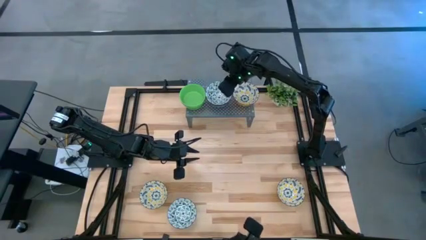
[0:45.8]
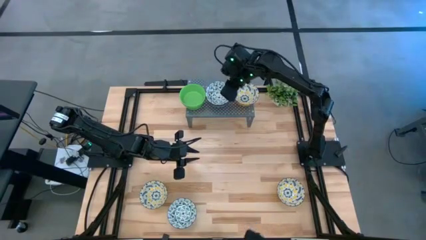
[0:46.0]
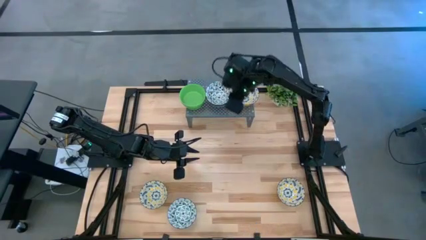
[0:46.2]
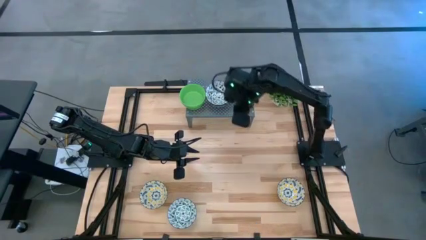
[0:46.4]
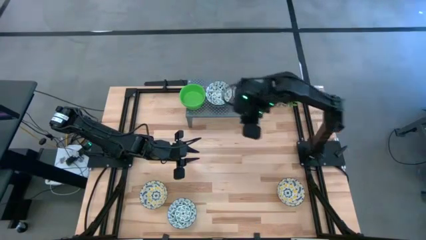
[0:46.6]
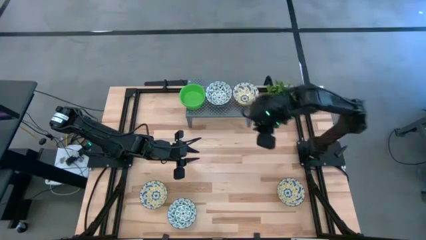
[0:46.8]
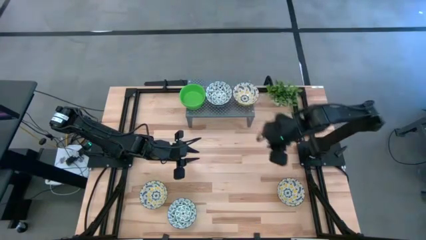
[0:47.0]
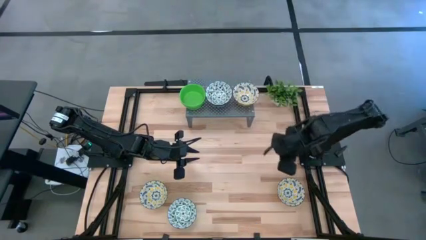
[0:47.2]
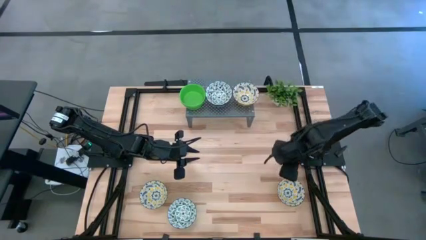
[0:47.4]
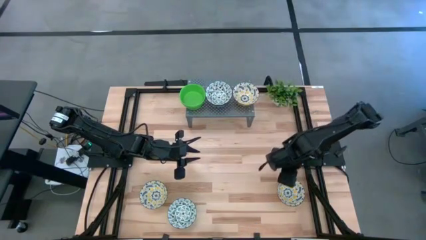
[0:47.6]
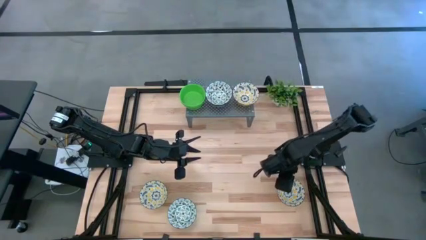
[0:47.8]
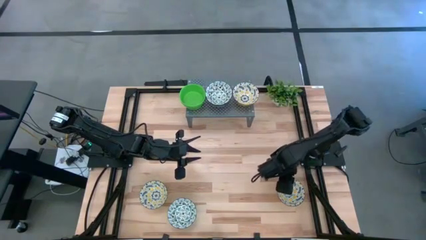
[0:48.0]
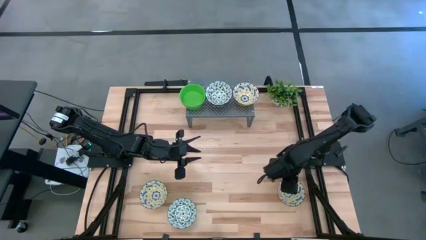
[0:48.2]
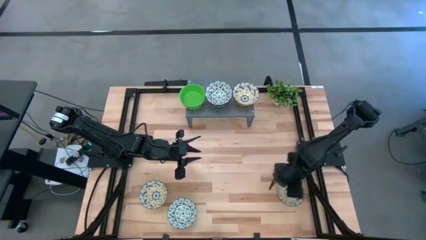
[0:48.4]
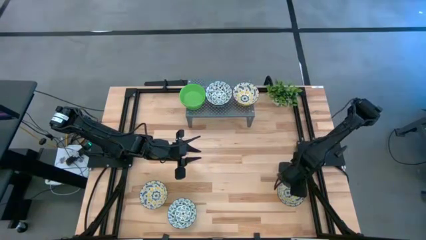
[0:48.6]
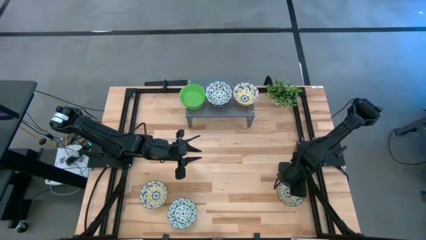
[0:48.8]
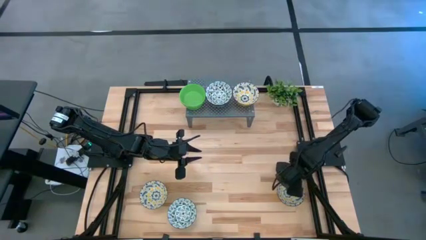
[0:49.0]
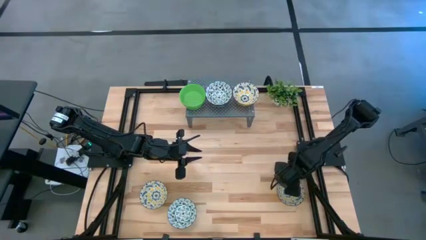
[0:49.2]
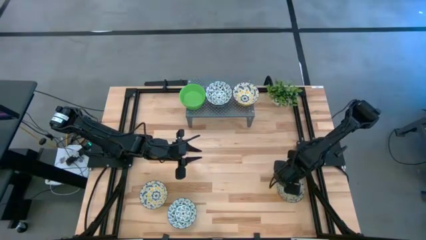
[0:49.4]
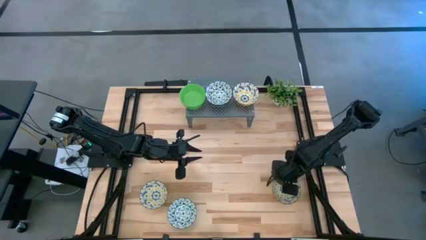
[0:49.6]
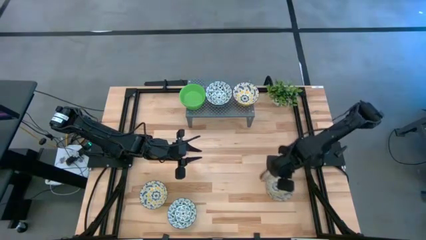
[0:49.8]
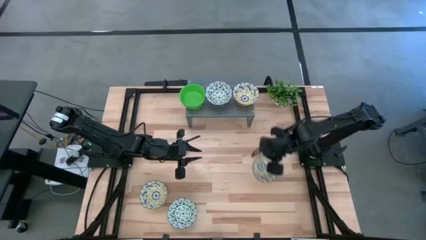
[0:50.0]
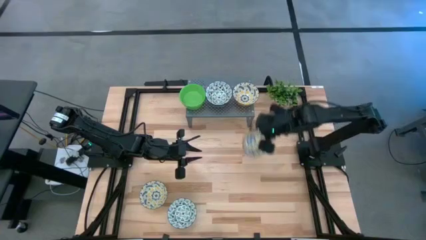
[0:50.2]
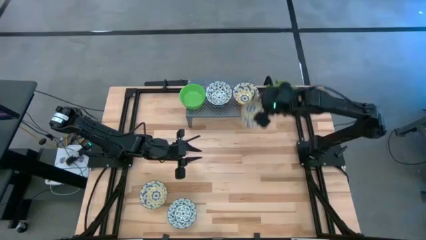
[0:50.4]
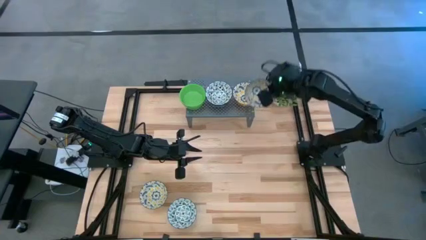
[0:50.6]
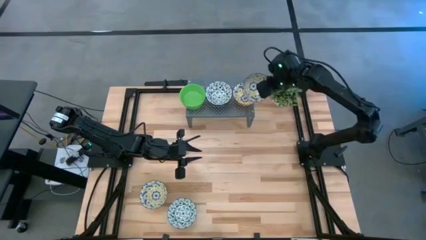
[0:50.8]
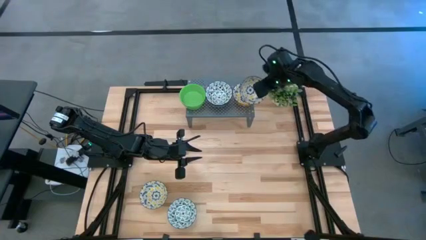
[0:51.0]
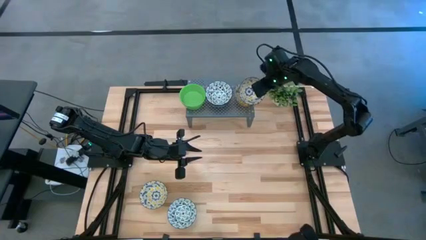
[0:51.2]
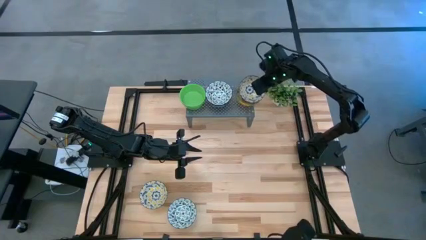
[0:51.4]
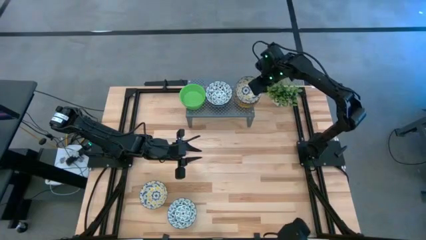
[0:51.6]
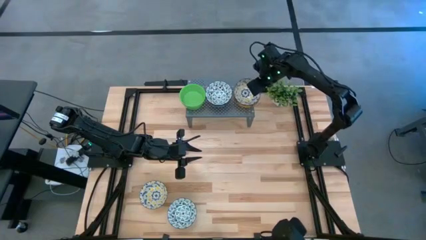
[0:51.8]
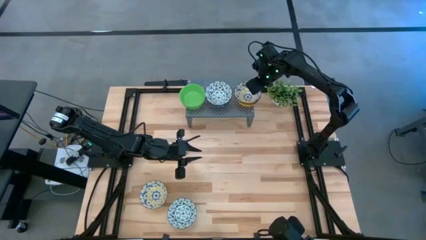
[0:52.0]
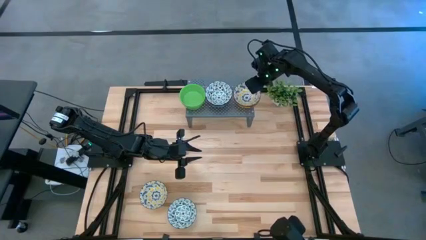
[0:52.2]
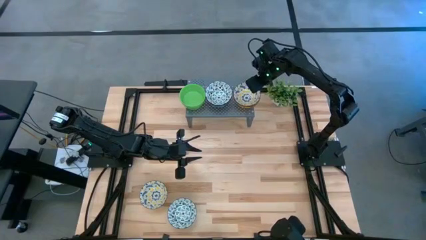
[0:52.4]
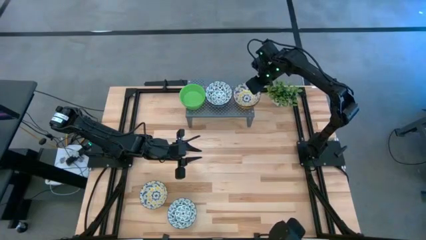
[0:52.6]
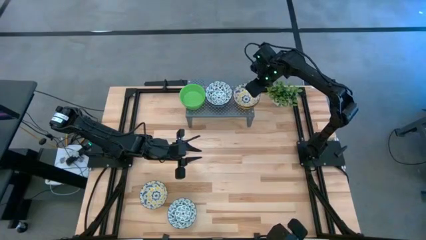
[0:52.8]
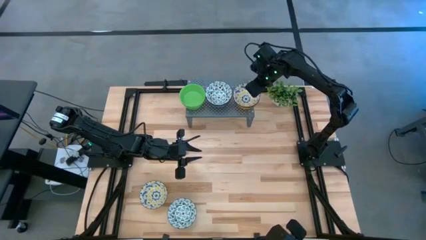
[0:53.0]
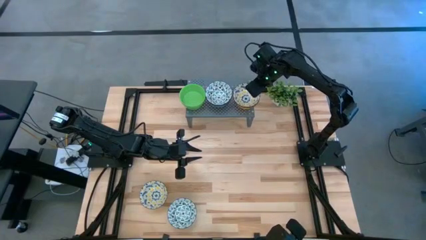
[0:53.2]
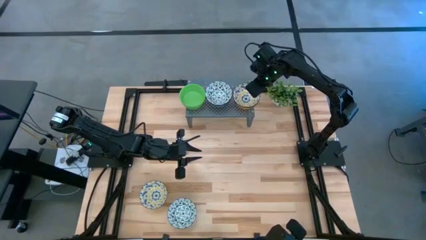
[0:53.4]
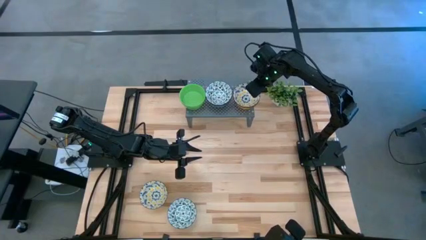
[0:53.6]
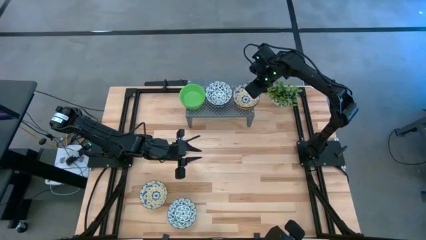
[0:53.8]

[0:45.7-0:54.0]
Task: Pick & Place Mini bowls
Stack the right yellow patterned bowl on top of the yellow patterned bowl on the shelf

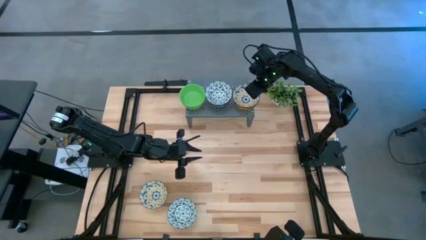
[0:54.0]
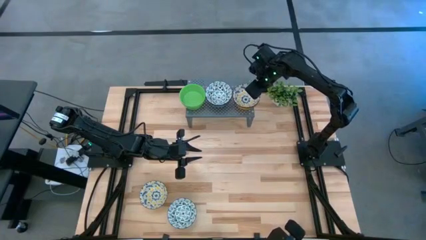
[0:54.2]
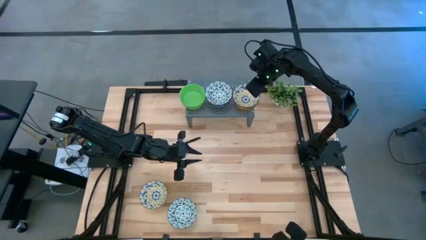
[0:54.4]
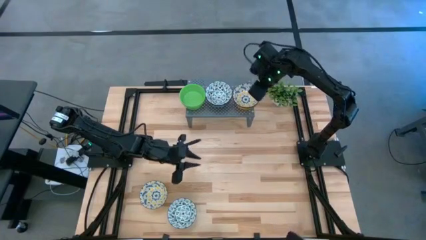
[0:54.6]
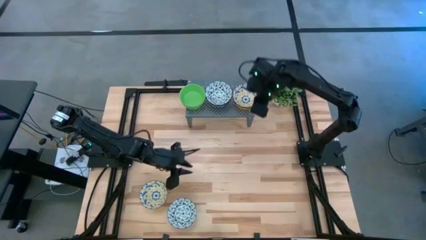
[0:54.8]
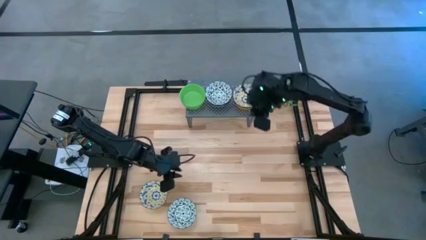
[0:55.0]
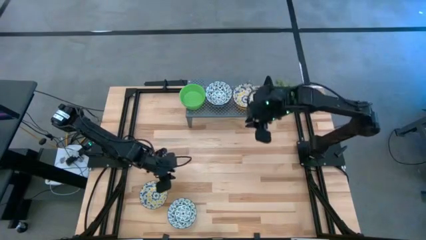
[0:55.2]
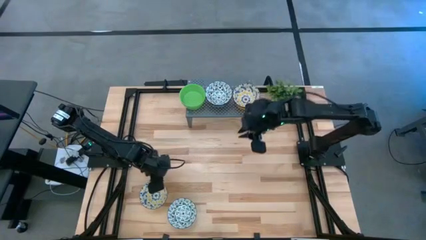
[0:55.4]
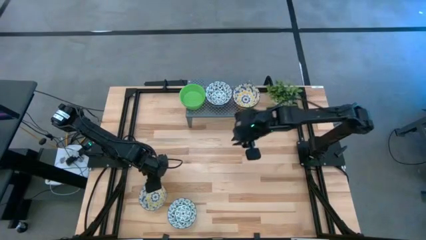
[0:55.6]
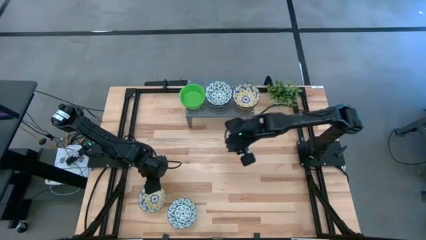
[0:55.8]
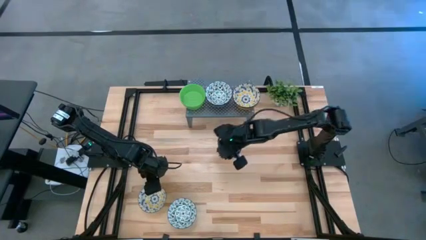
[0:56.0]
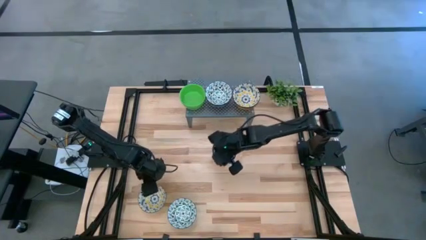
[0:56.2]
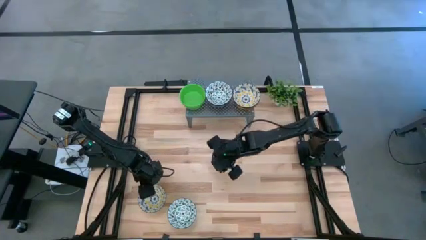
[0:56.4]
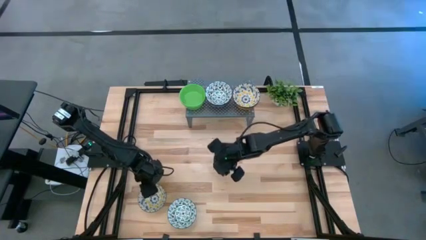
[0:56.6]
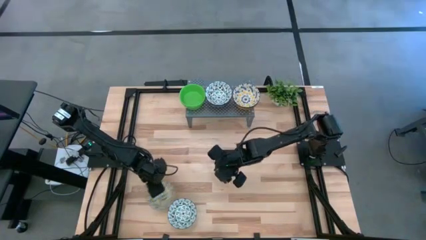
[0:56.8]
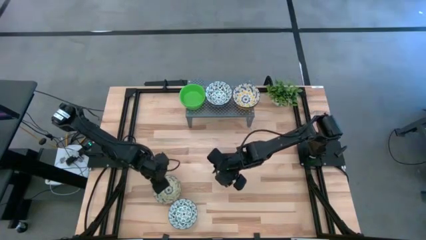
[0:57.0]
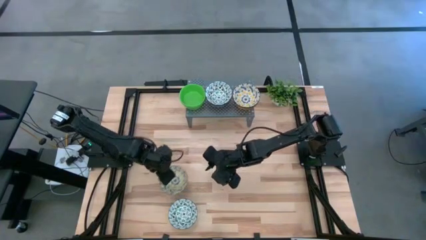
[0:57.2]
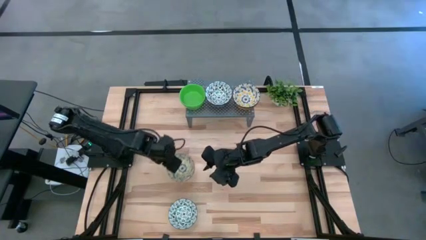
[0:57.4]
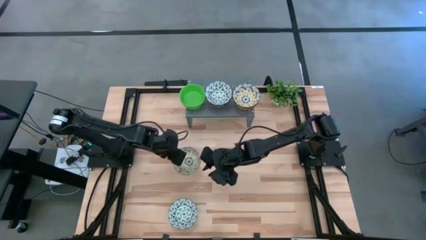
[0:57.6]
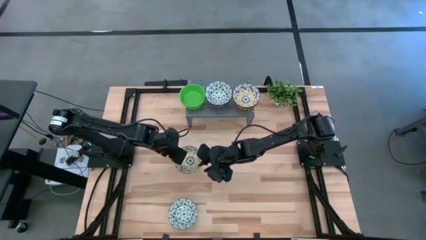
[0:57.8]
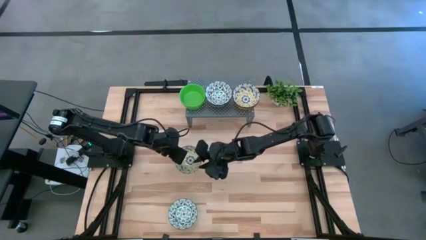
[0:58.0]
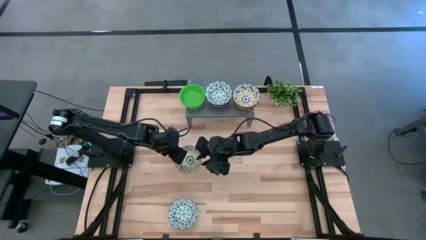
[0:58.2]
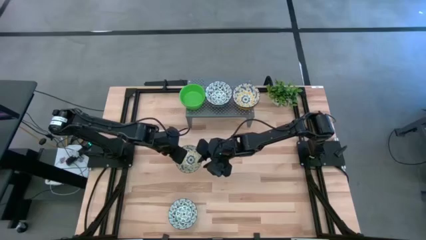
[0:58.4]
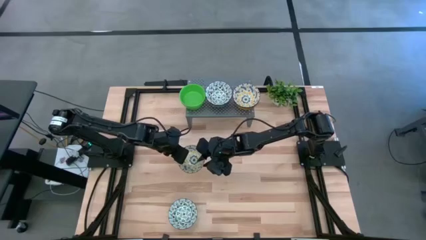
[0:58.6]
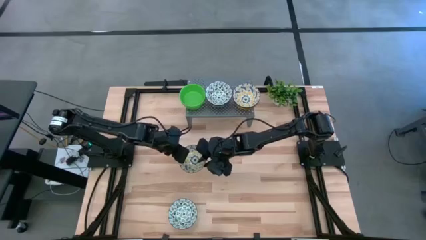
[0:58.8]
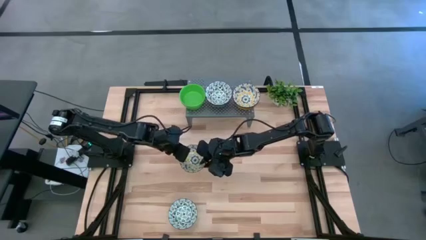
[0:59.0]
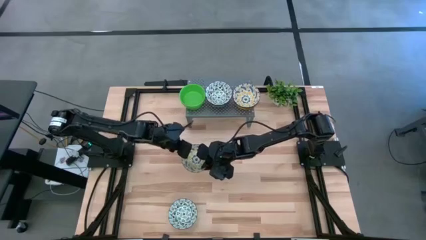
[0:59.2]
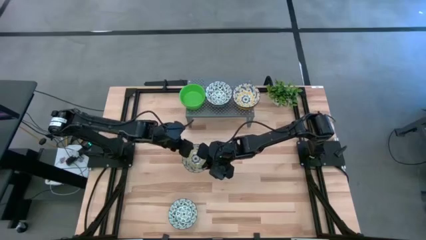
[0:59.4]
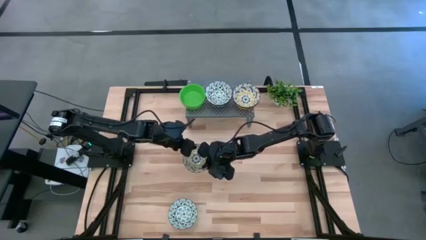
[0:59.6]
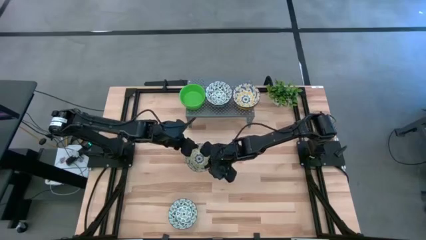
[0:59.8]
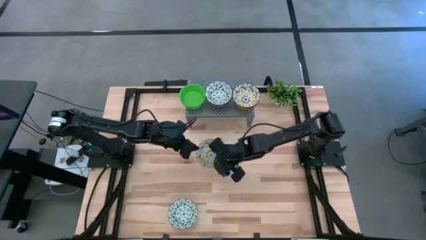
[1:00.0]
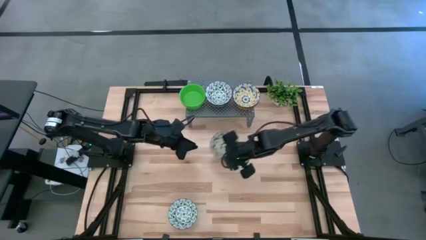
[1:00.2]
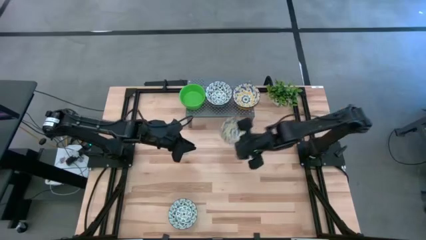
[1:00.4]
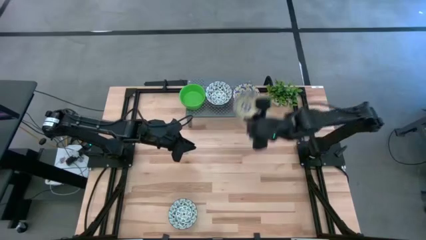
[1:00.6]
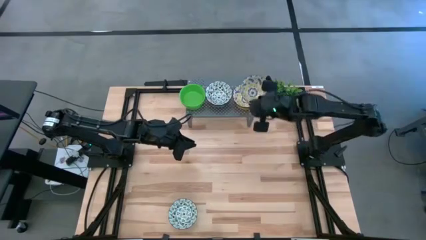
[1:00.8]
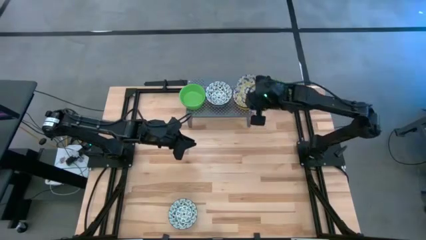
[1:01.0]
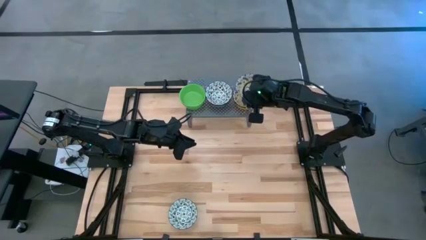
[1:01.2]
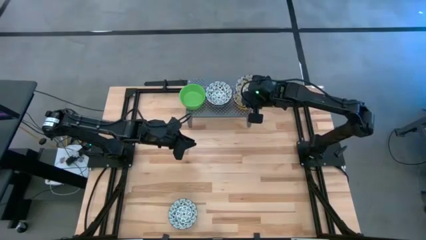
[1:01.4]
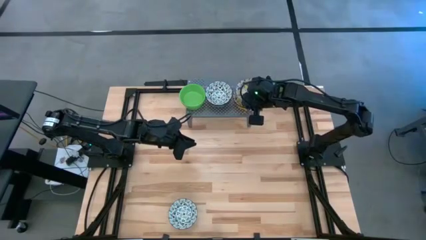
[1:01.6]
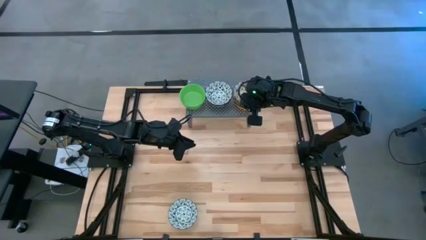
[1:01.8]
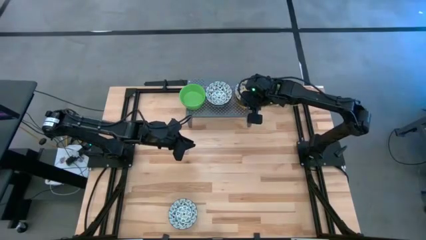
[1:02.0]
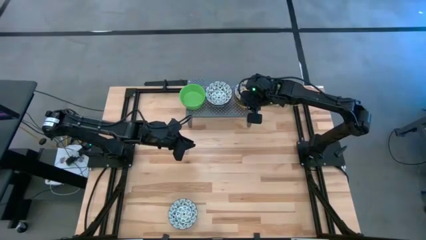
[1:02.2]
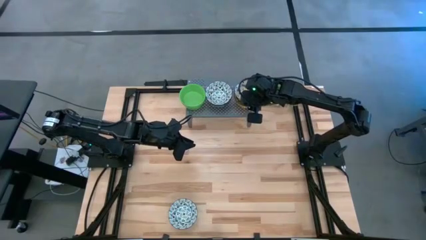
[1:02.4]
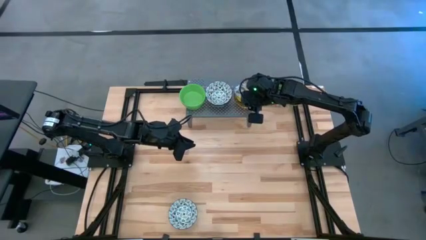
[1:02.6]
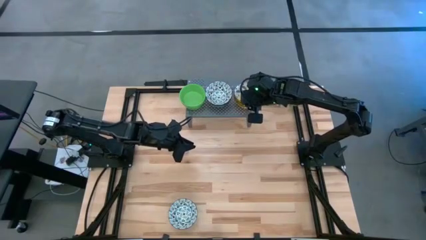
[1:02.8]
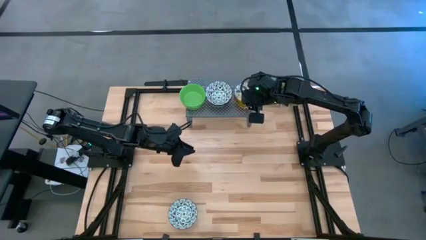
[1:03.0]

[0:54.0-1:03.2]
Stack the yellow patterned bowl on top of the yellow patterned bowl on the shelf
